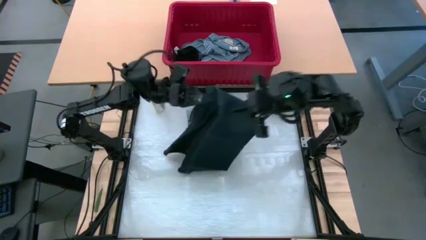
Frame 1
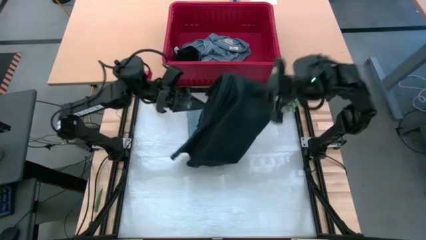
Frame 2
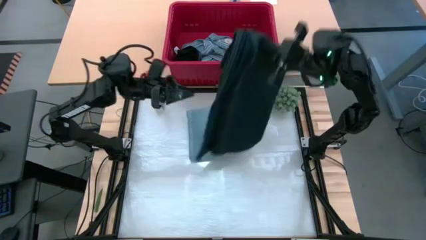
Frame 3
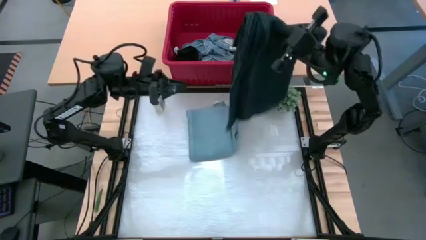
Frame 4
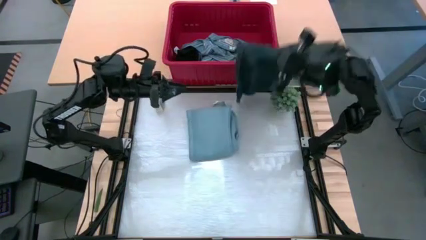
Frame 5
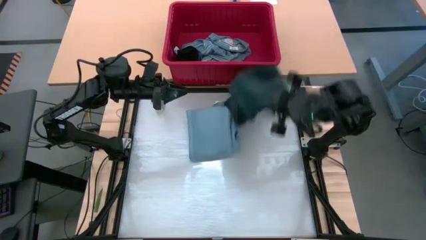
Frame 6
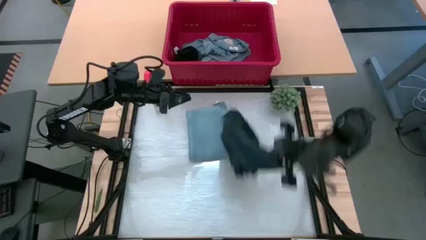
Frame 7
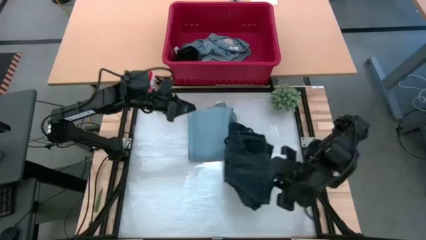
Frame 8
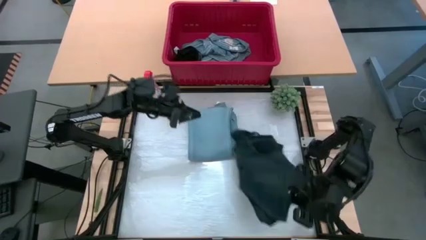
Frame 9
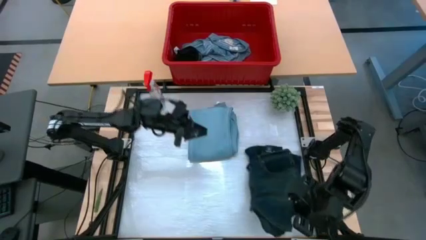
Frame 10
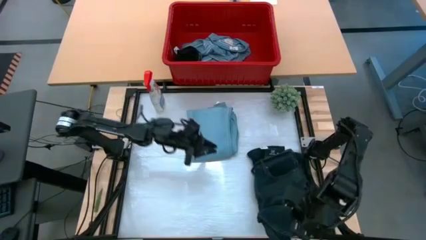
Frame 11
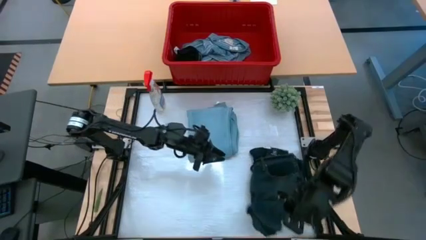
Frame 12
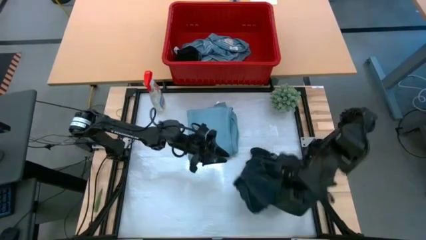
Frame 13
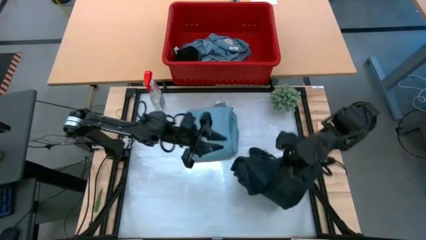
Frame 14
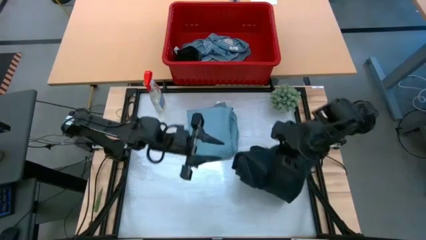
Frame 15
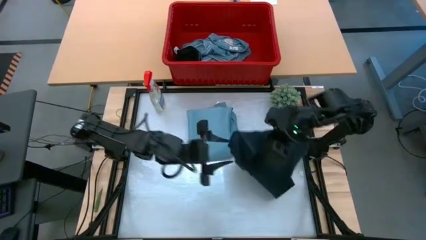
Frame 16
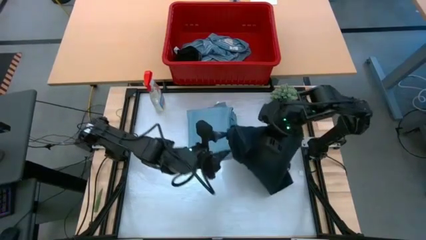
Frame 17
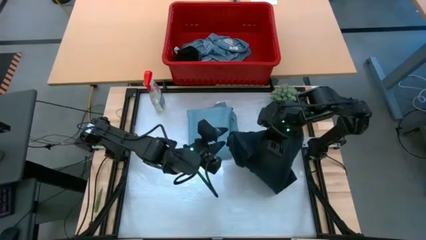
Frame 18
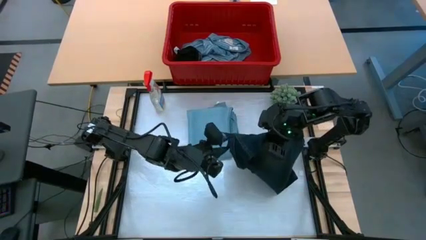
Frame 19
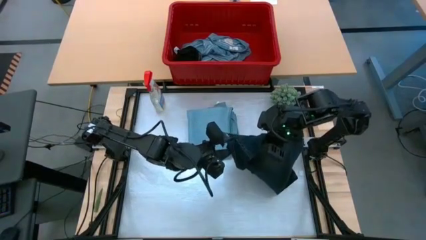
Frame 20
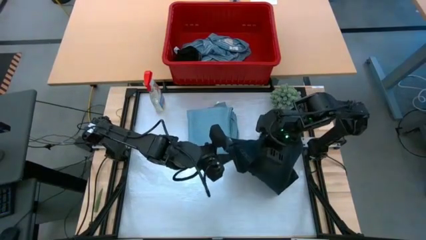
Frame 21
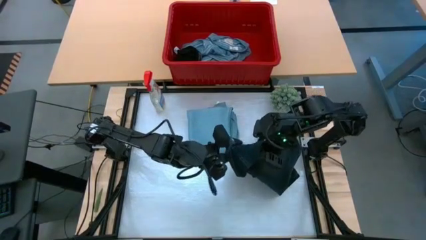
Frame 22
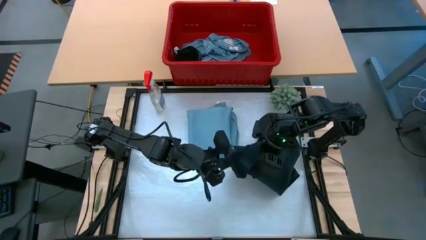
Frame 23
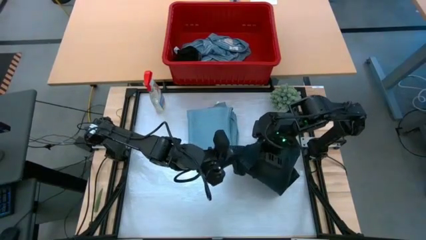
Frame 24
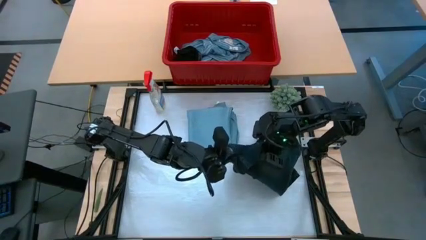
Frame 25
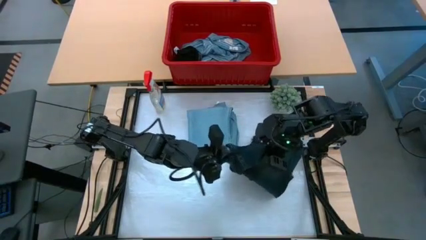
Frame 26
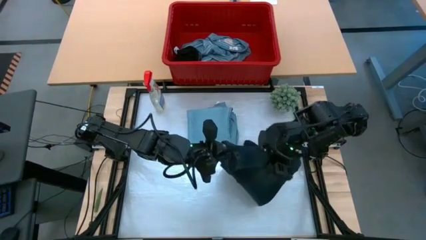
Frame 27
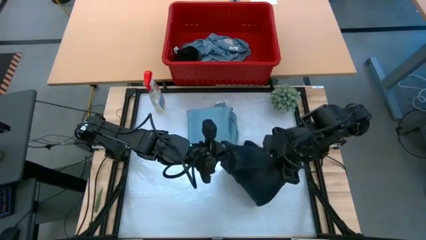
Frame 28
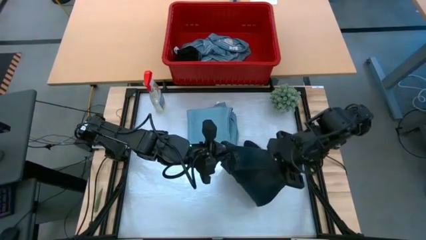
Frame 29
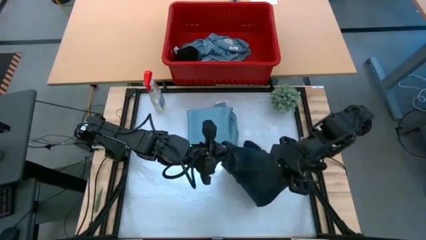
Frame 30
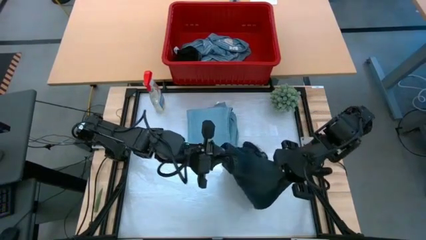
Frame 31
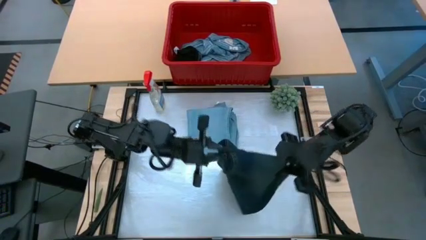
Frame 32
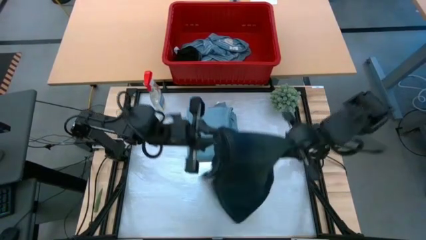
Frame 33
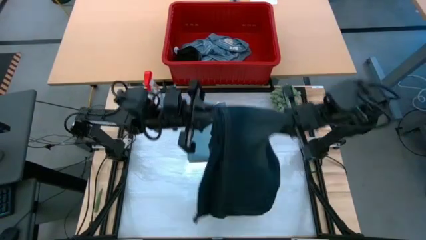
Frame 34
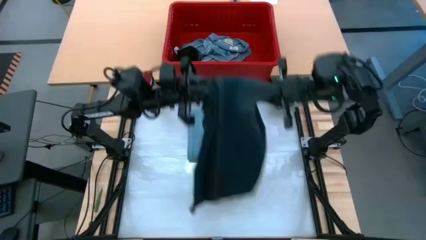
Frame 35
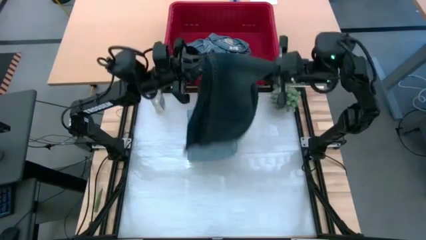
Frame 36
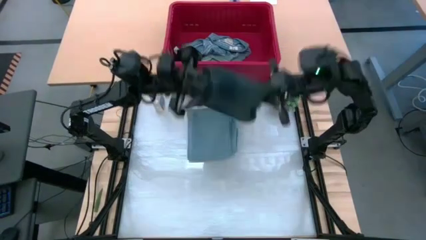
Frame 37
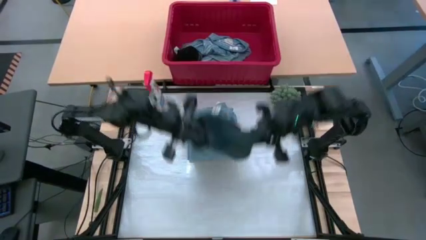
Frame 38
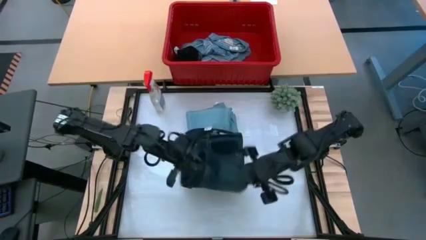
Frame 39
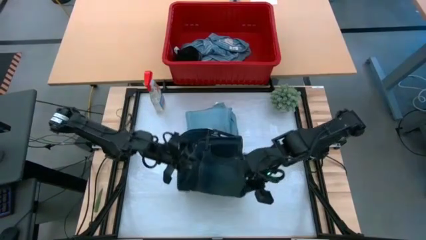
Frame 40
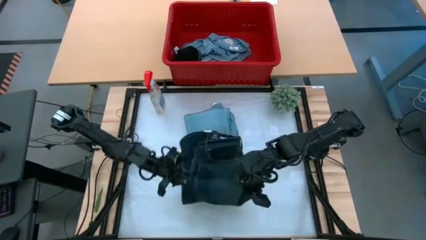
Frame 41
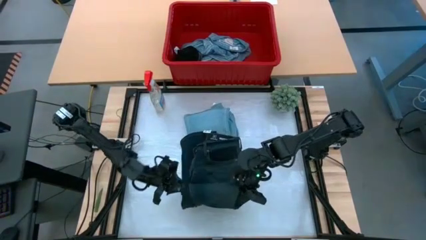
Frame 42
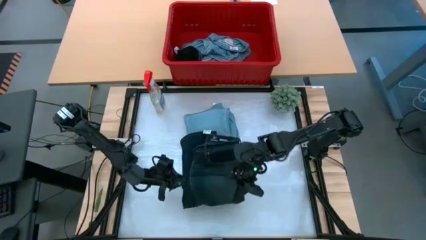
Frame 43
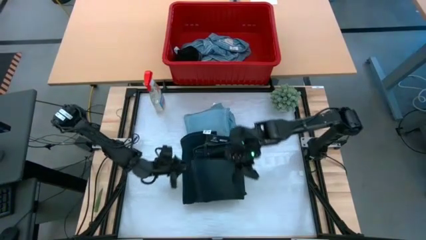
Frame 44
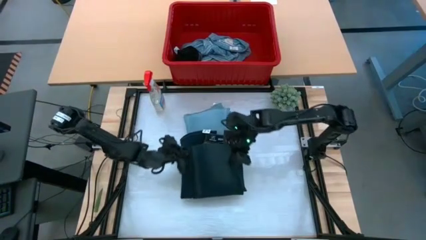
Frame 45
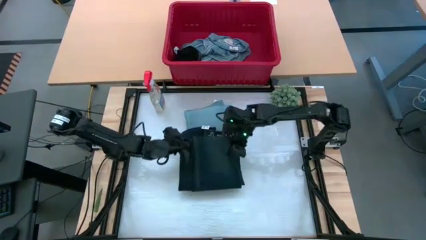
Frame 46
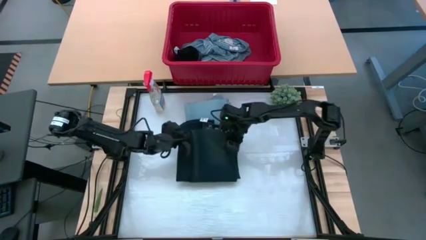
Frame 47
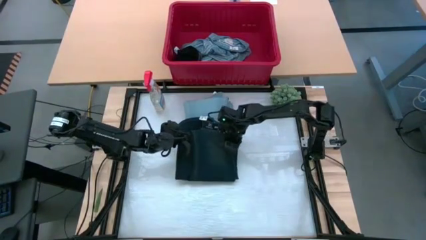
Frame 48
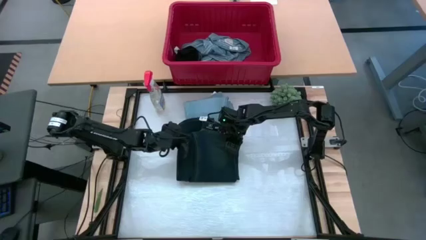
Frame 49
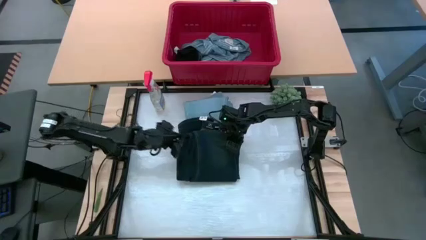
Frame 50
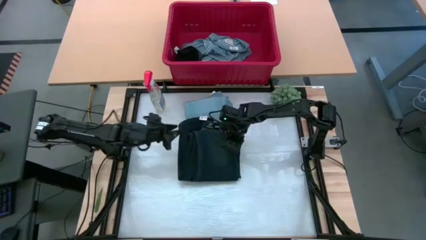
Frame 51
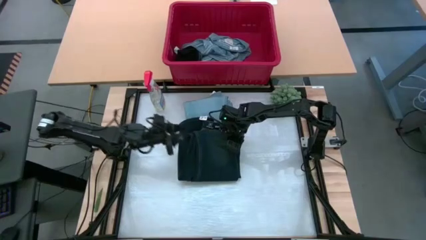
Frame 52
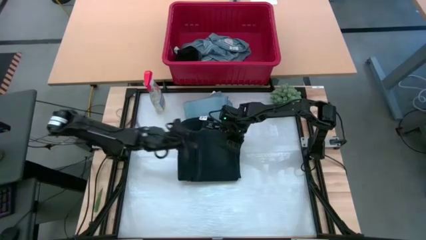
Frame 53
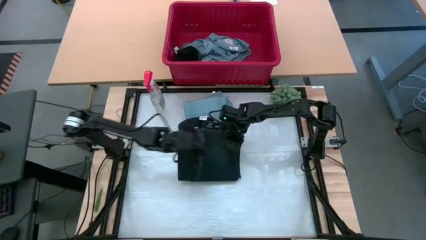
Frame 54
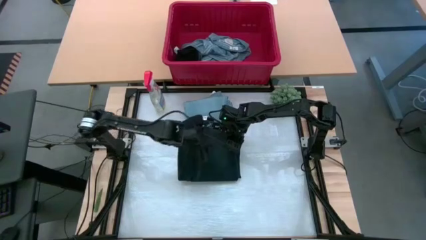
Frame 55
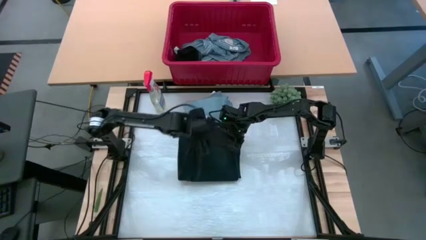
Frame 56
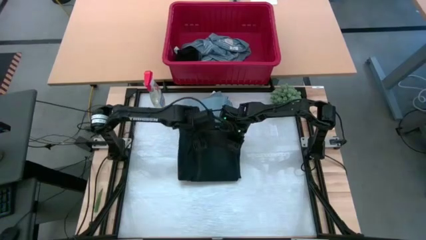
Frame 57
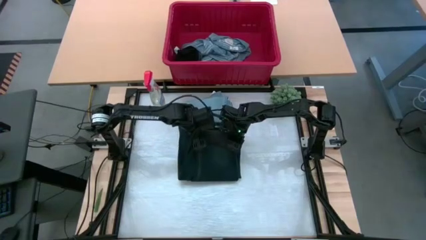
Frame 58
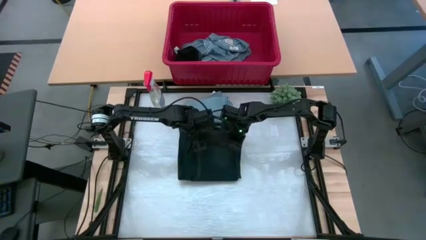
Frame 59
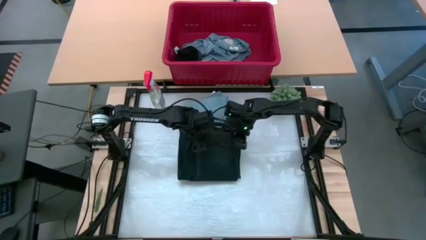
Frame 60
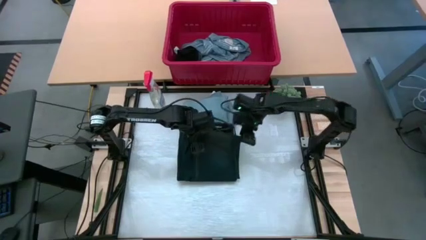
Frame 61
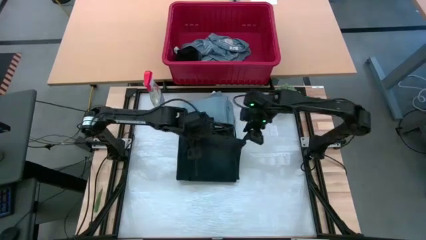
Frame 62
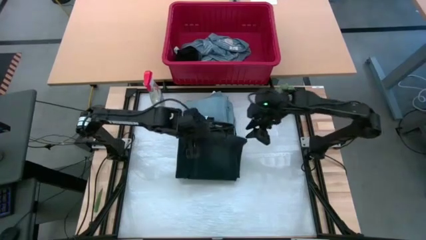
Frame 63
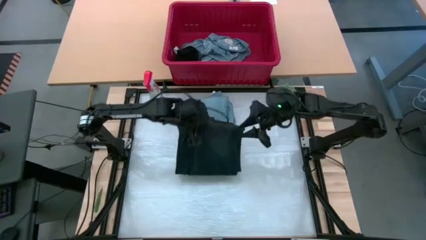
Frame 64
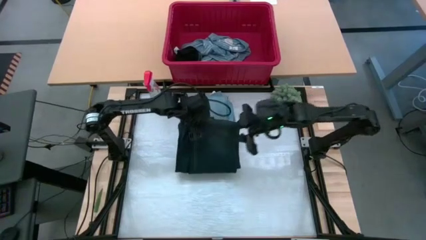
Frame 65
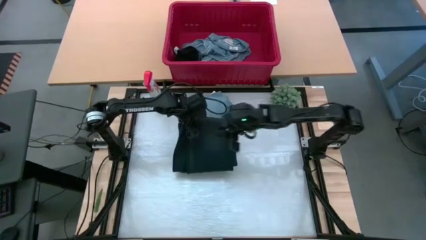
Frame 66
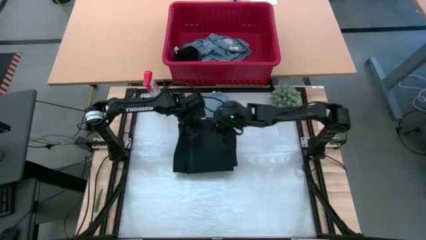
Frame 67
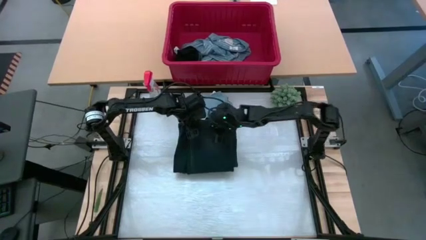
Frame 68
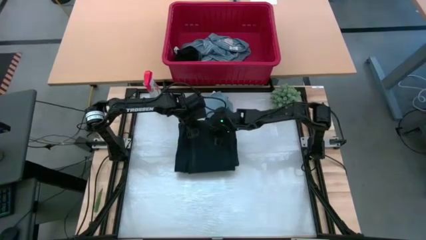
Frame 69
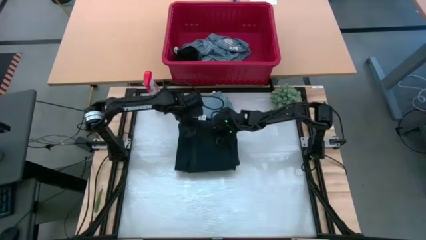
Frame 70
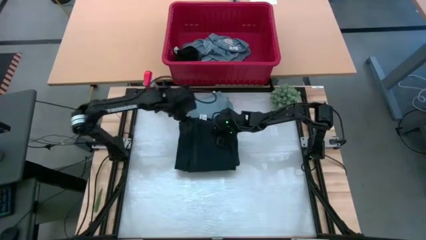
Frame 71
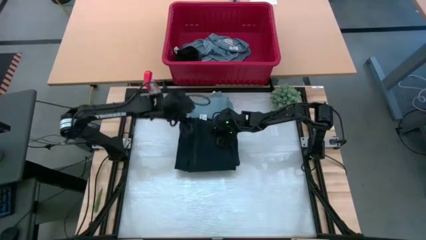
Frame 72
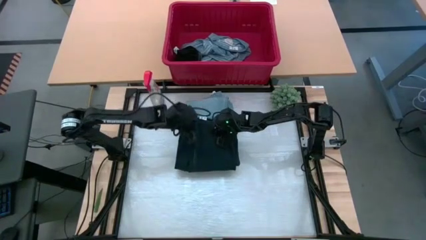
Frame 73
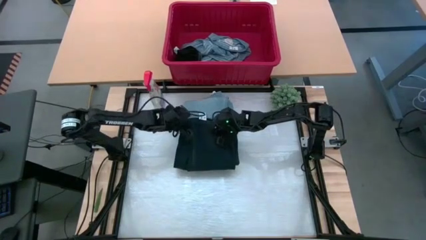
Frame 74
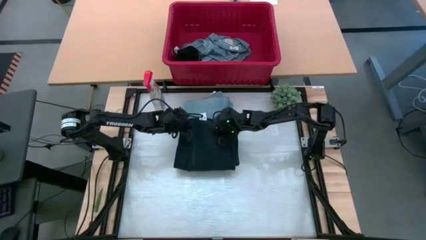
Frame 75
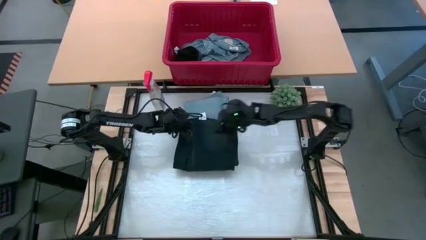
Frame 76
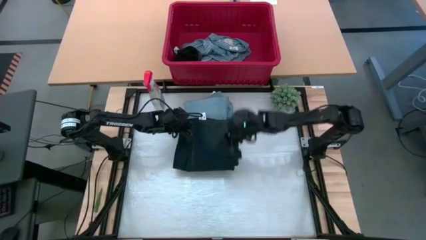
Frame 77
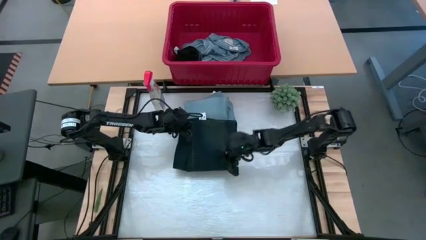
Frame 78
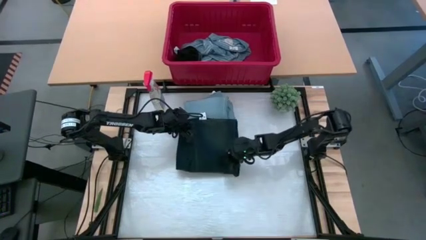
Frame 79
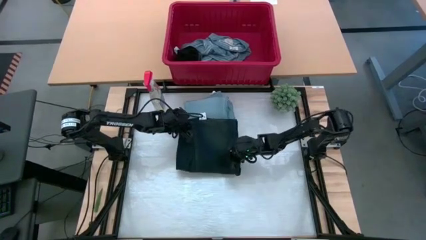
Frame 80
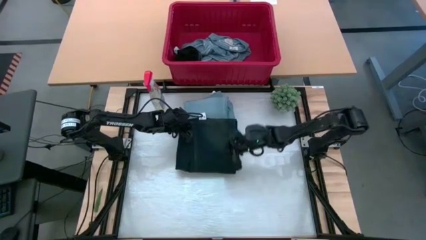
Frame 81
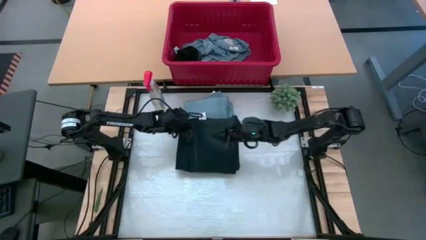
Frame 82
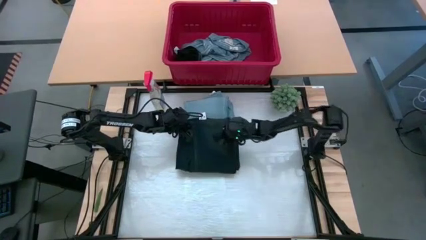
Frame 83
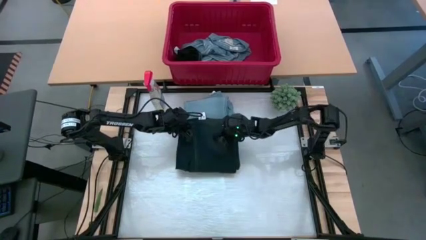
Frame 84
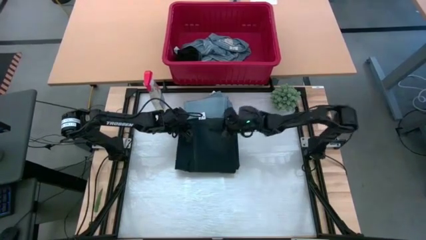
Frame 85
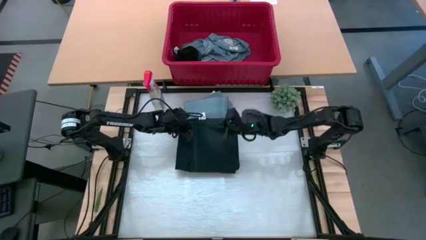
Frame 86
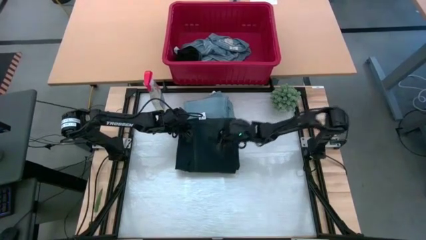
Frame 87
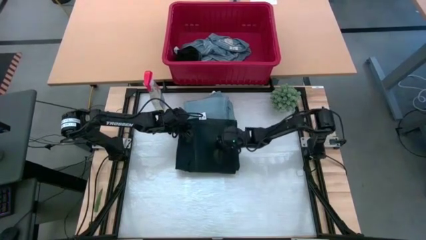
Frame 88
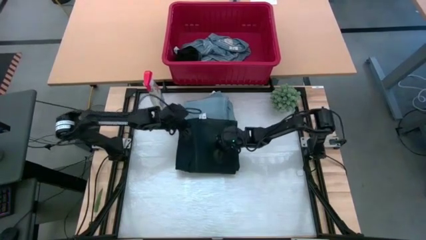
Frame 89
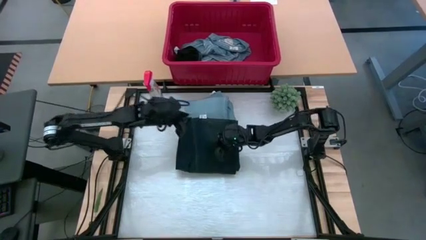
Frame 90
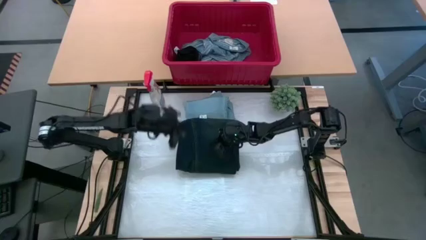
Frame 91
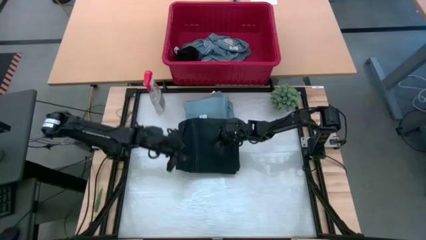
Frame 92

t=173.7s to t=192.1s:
Task: Fold Laundry from Bin
Fold the black pants from the red laundry bin
